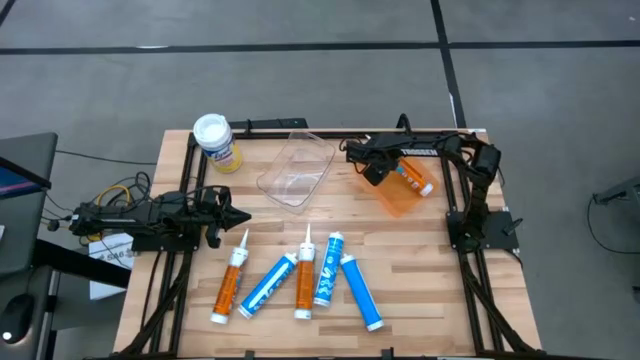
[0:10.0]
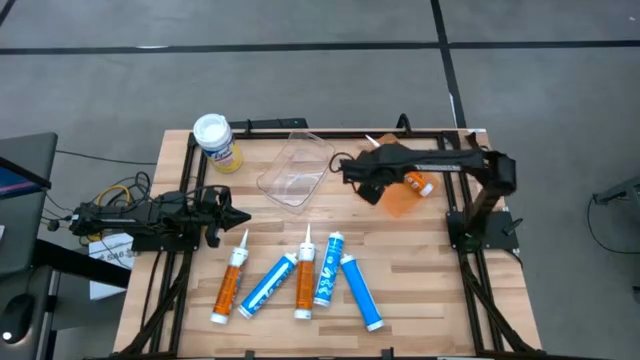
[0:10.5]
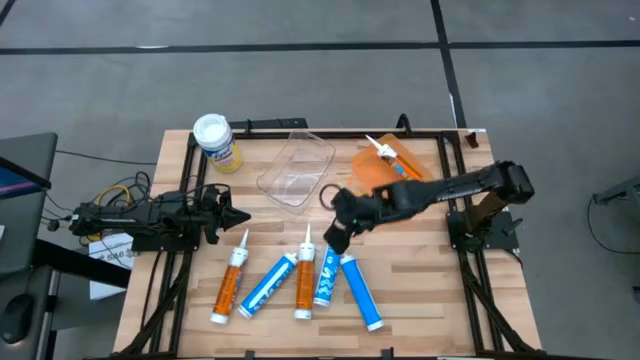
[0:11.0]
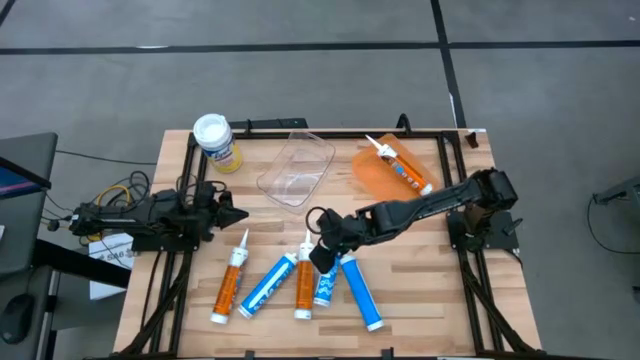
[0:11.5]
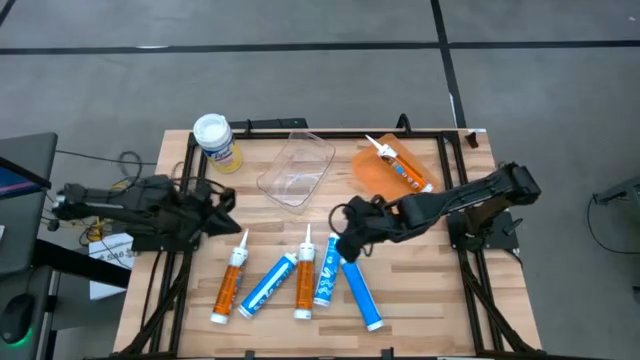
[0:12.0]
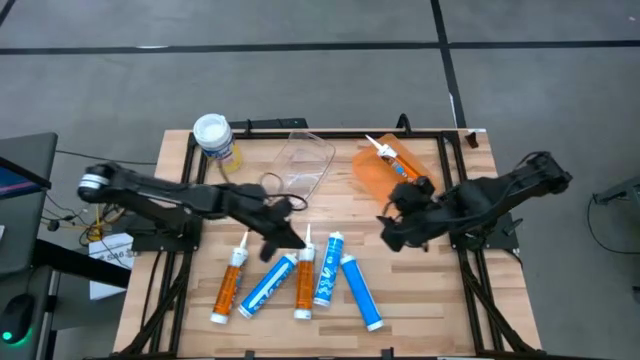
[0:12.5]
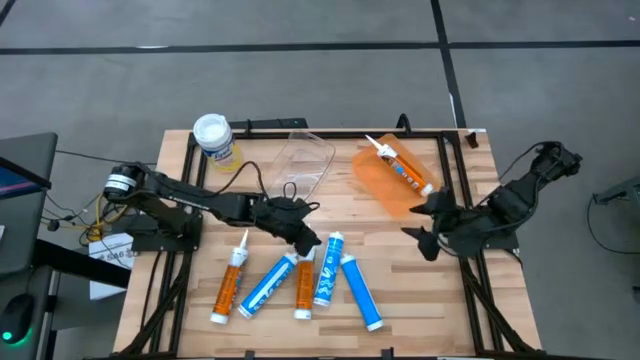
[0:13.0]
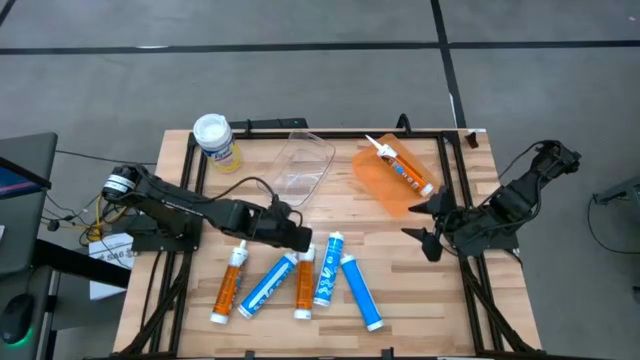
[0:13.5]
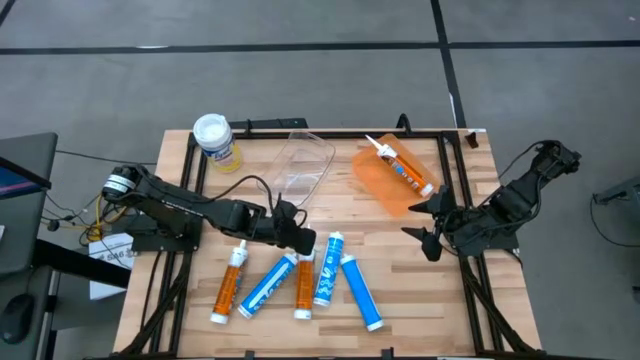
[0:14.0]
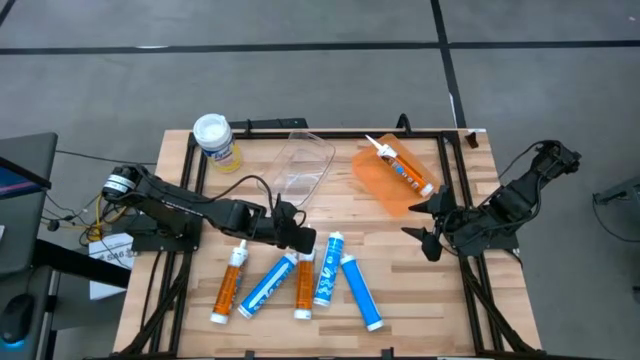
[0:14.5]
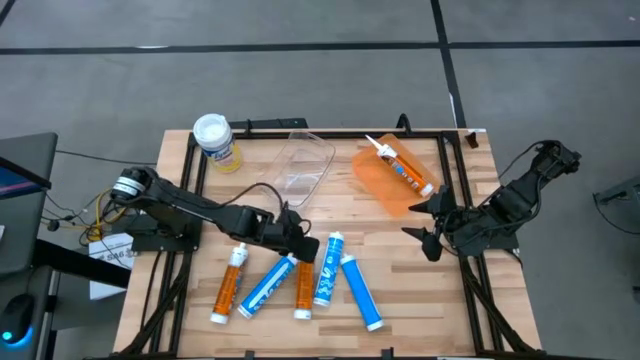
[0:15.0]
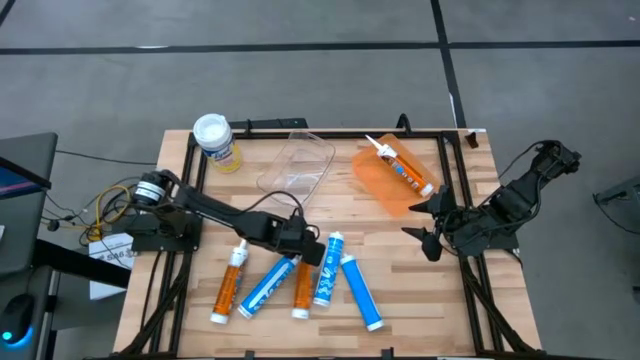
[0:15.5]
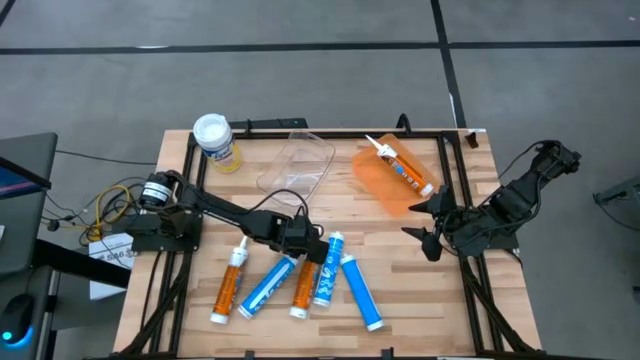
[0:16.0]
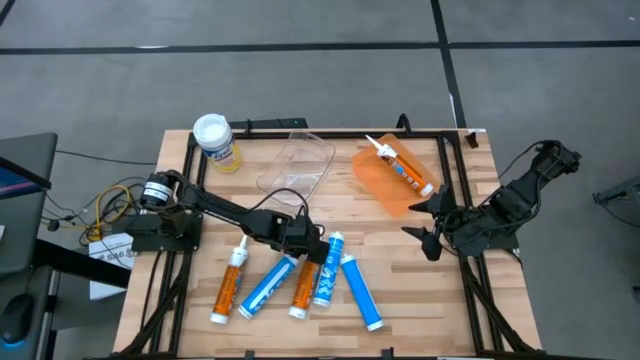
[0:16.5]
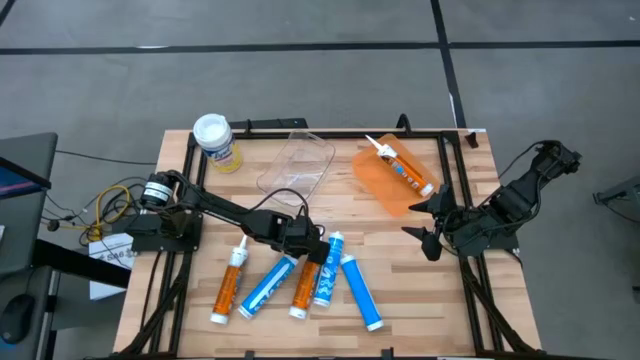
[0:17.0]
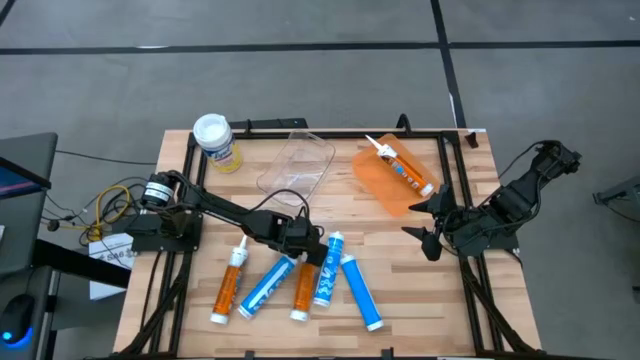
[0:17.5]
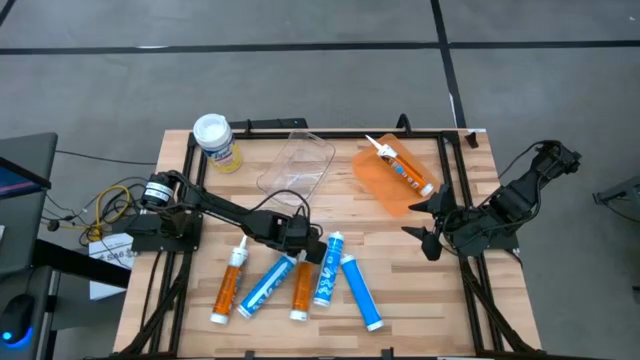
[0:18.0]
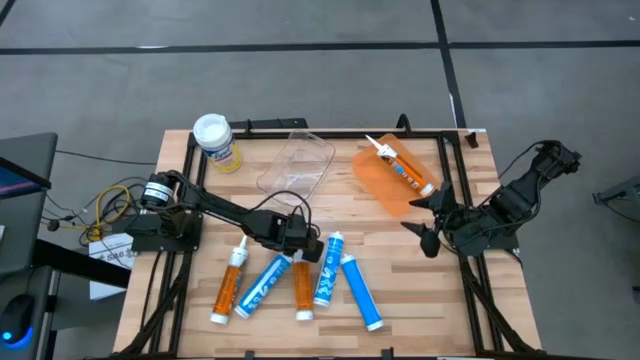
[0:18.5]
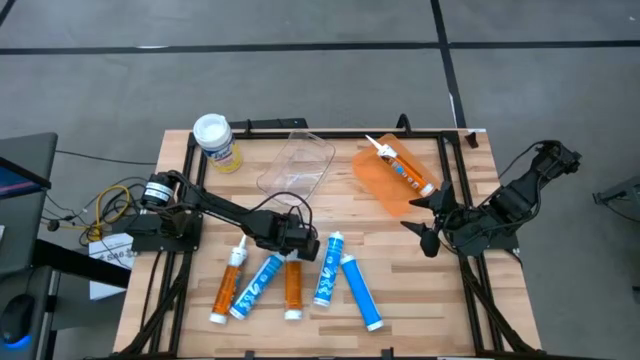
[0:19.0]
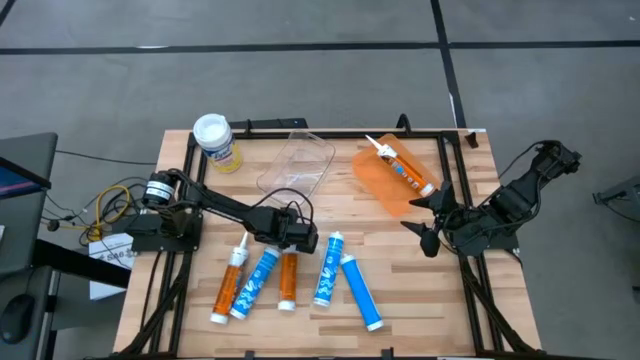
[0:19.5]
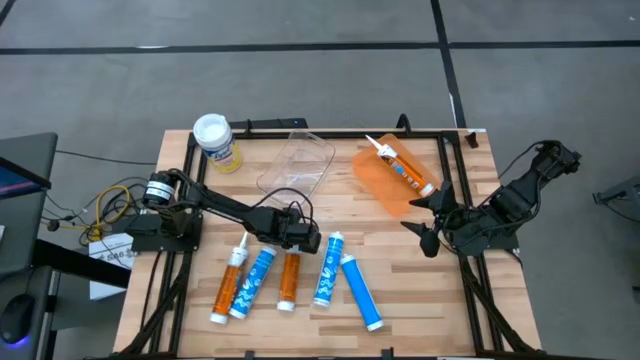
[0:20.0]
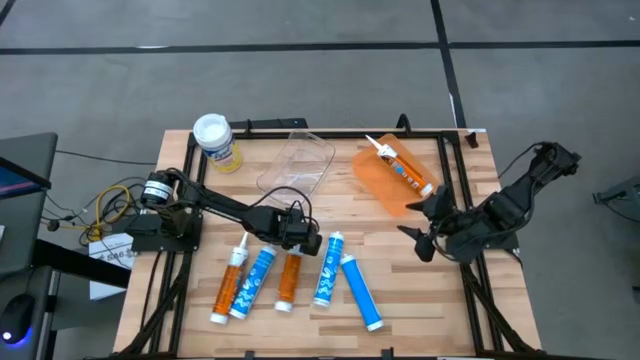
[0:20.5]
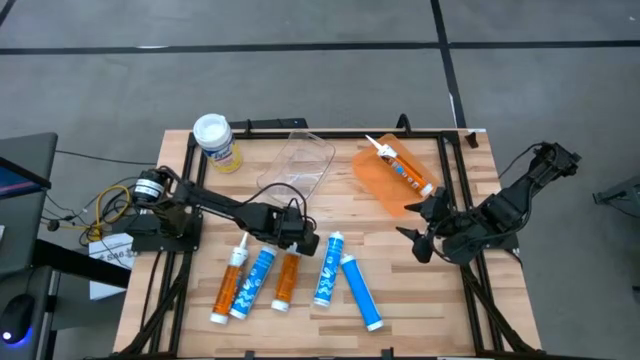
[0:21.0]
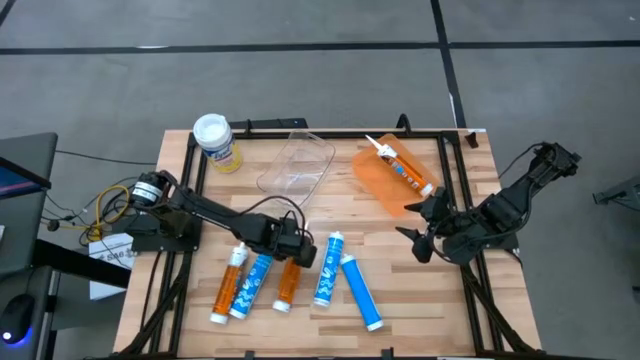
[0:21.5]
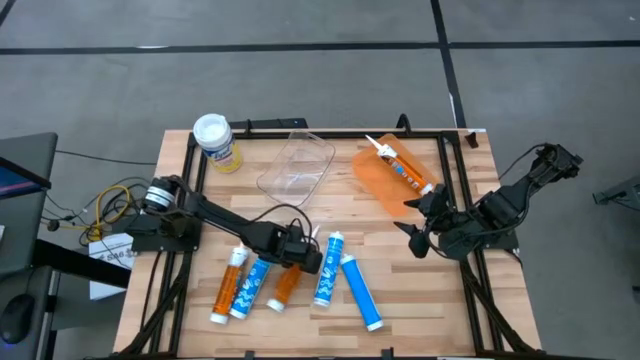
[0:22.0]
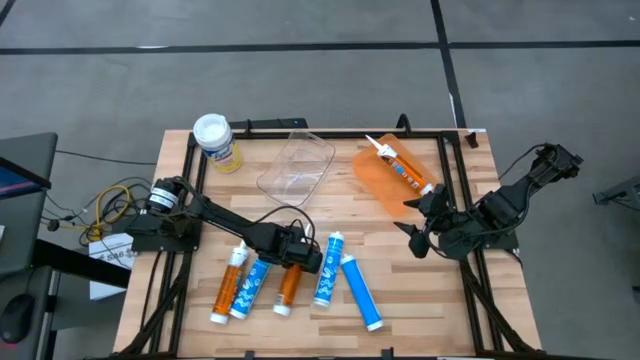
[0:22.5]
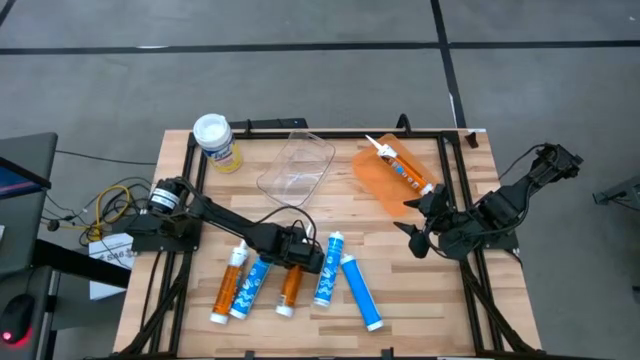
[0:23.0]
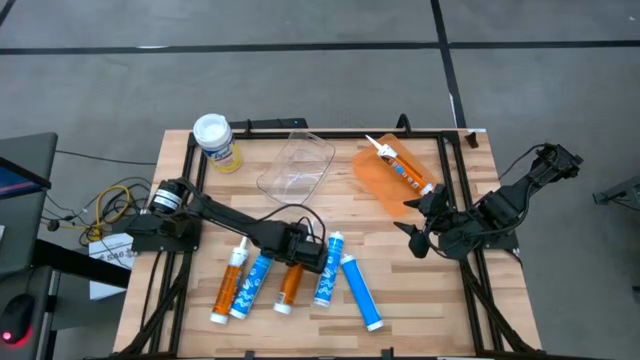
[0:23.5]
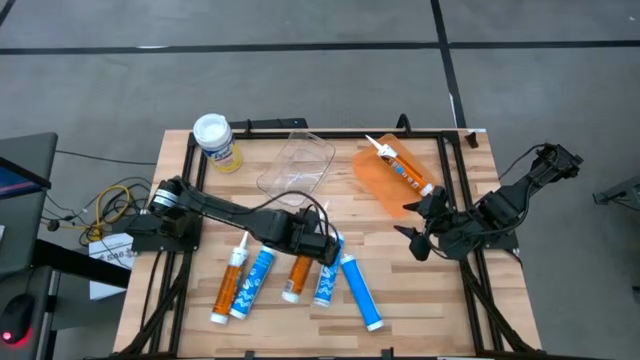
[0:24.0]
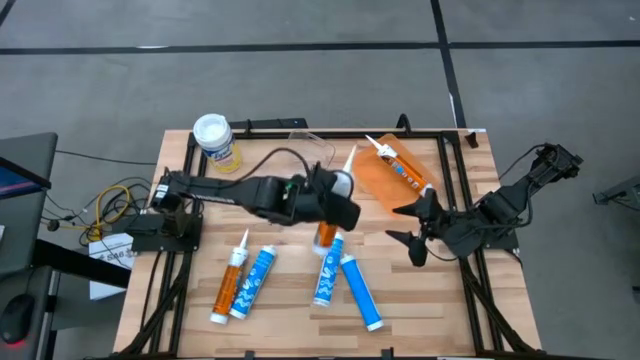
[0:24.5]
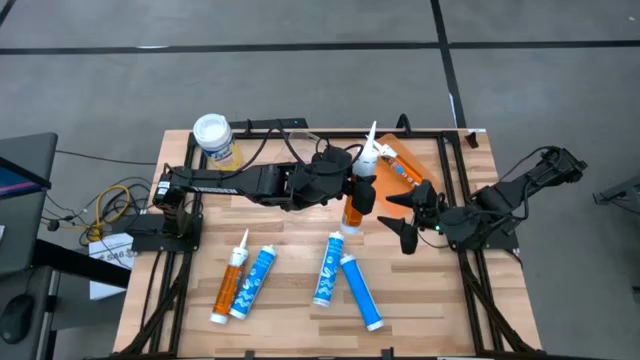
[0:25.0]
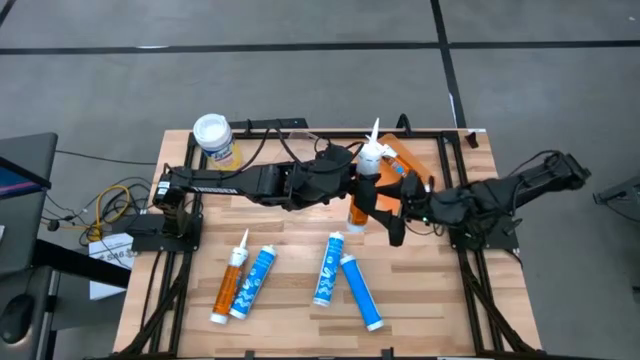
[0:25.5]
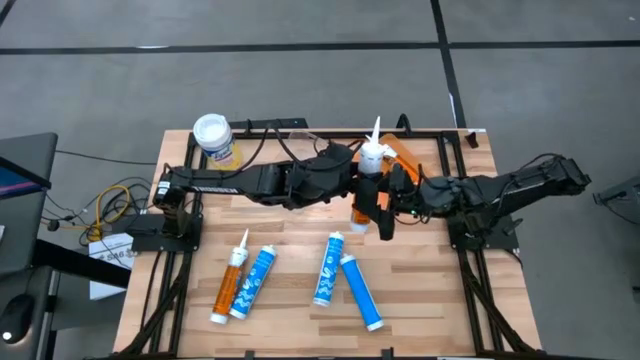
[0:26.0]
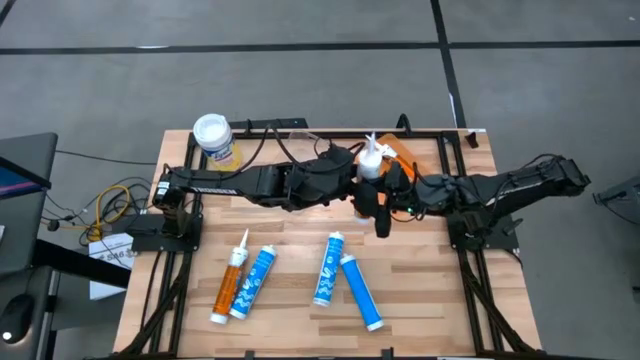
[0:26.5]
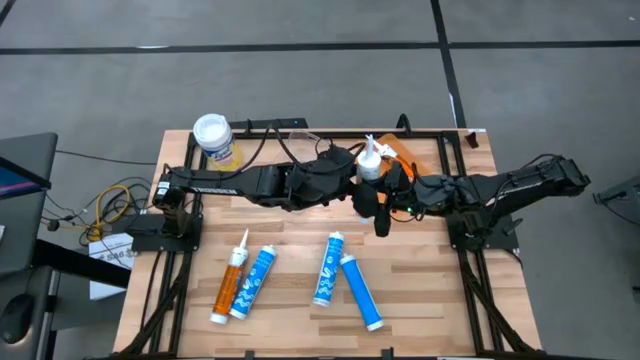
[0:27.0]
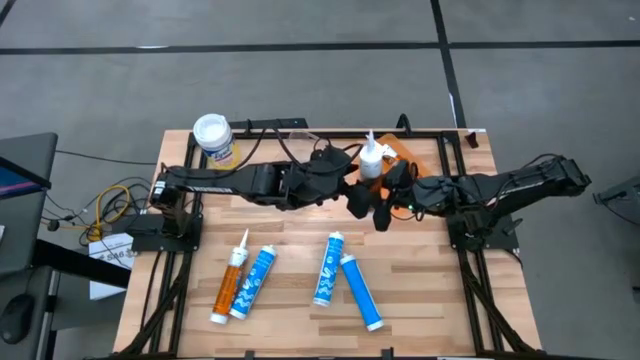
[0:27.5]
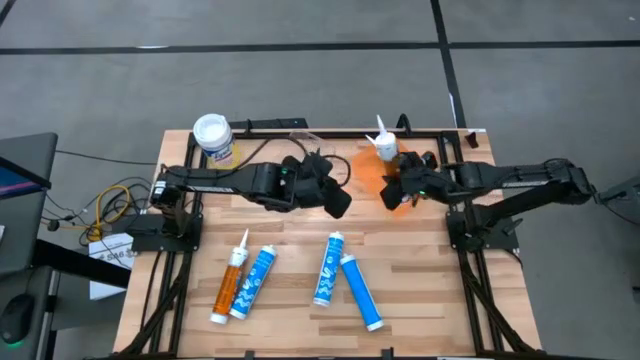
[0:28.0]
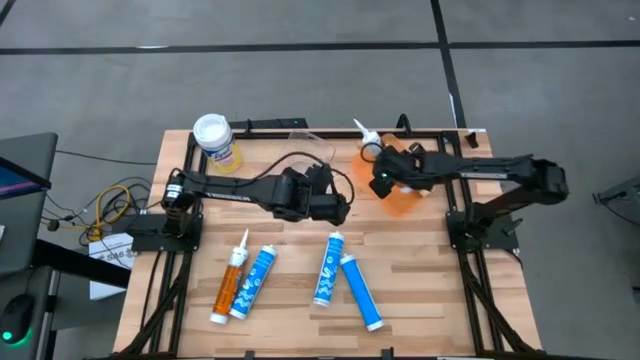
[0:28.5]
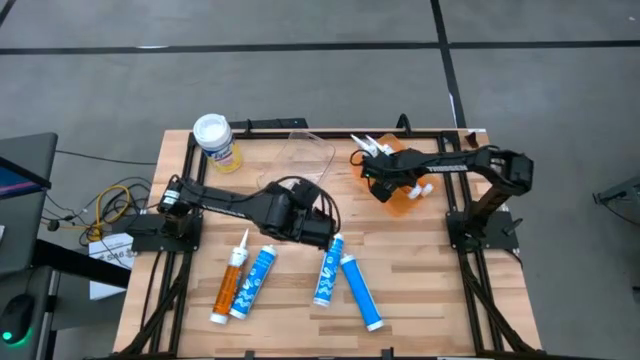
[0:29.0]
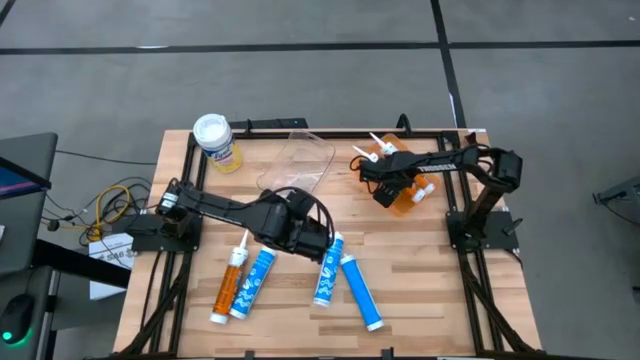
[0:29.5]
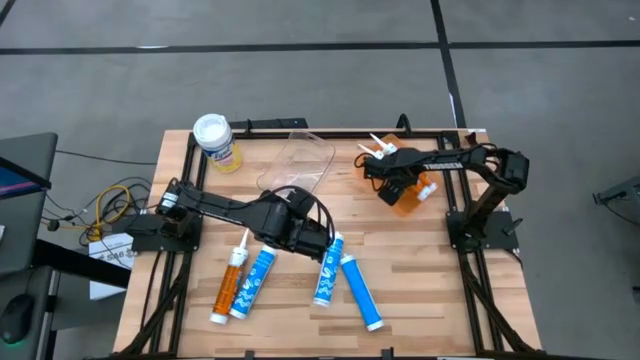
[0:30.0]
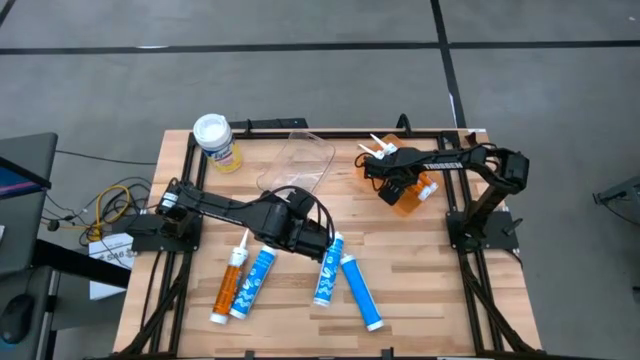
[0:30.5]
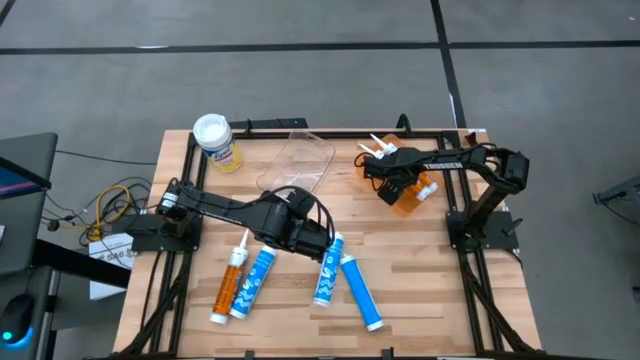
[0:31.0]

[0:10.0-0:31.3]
Task: Pick & place silicon tubes, Sealant and Lysol wipes
Put the right orange sealant into the orange bin
